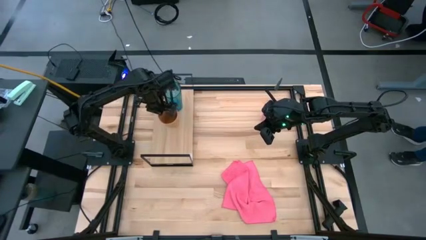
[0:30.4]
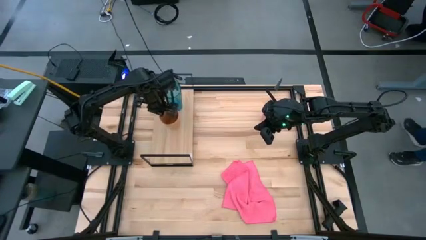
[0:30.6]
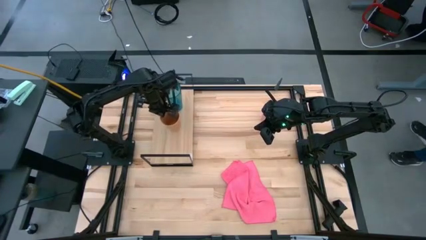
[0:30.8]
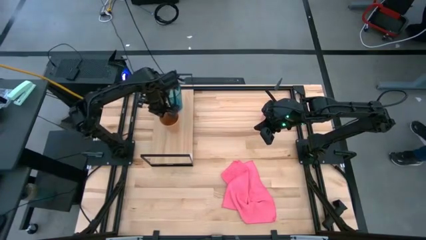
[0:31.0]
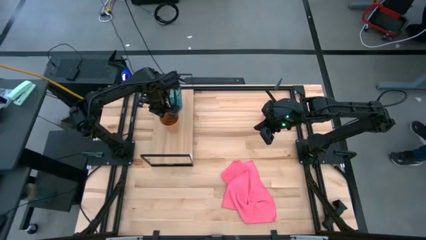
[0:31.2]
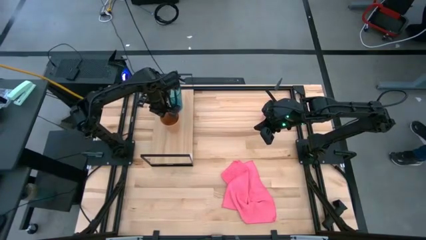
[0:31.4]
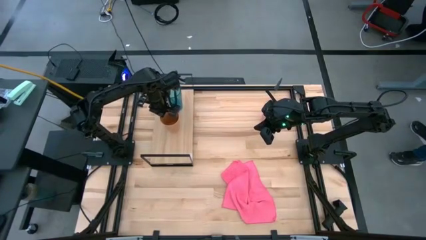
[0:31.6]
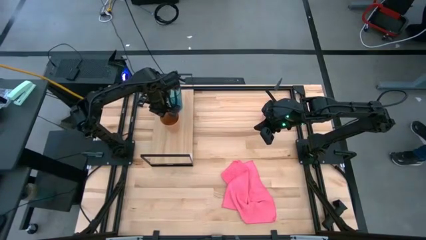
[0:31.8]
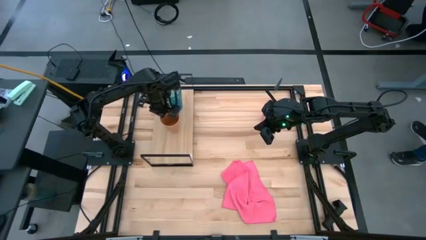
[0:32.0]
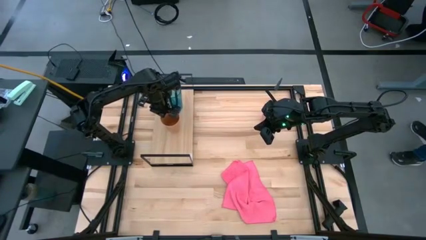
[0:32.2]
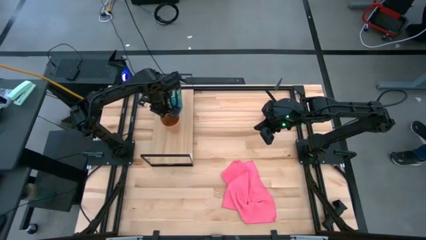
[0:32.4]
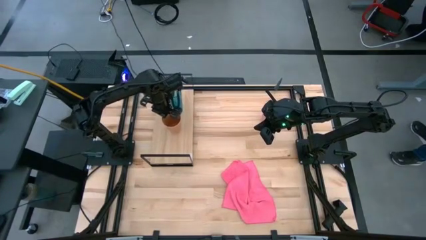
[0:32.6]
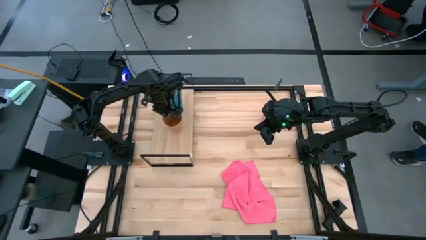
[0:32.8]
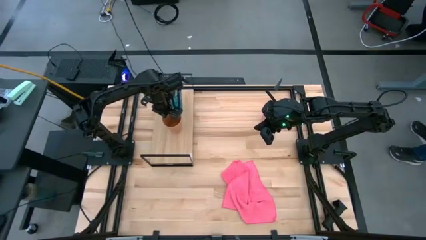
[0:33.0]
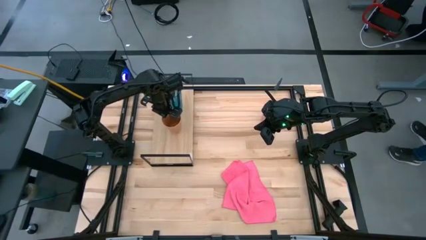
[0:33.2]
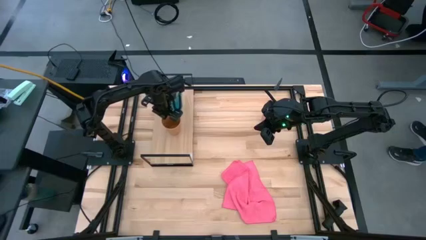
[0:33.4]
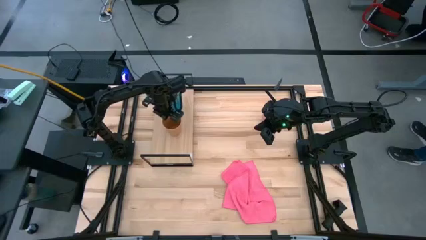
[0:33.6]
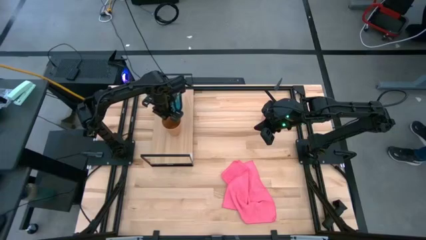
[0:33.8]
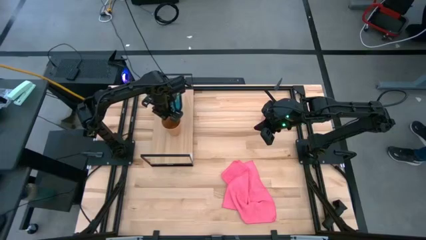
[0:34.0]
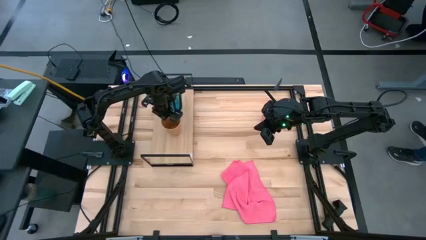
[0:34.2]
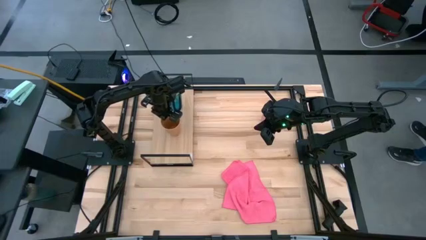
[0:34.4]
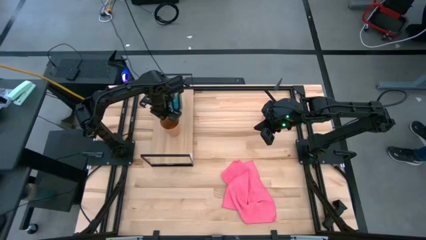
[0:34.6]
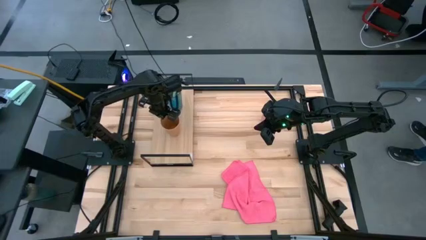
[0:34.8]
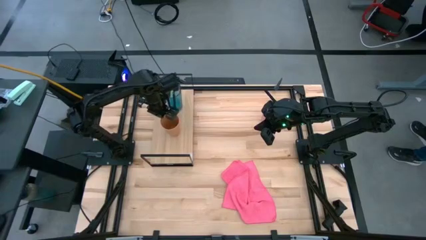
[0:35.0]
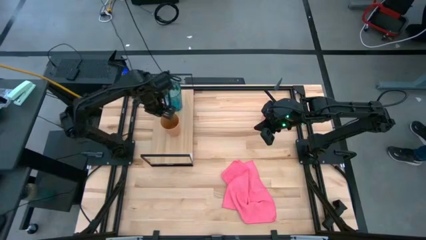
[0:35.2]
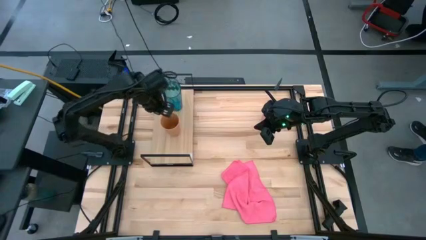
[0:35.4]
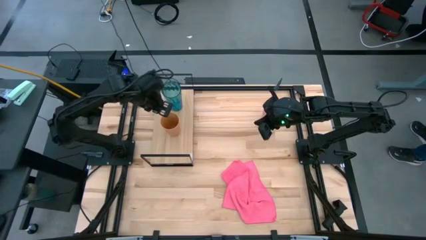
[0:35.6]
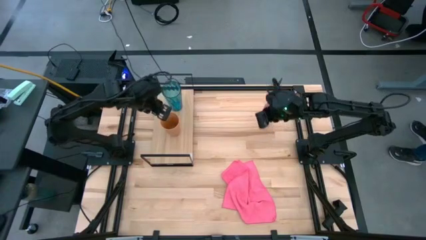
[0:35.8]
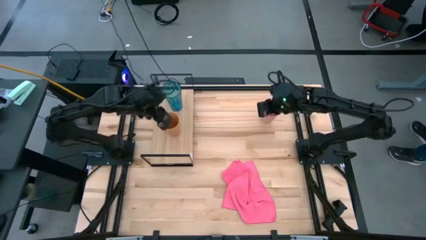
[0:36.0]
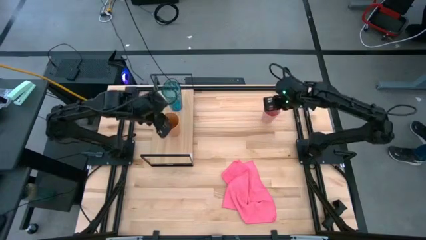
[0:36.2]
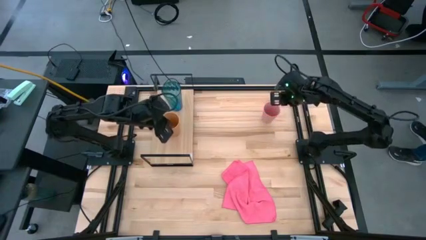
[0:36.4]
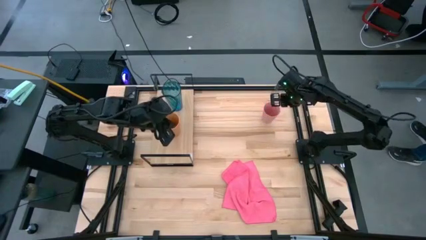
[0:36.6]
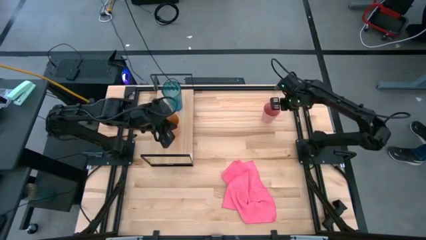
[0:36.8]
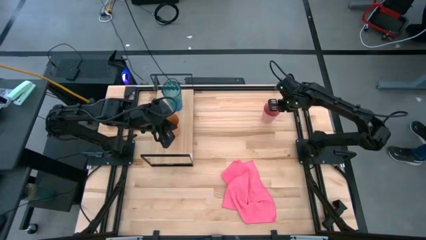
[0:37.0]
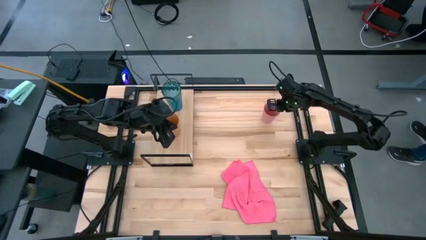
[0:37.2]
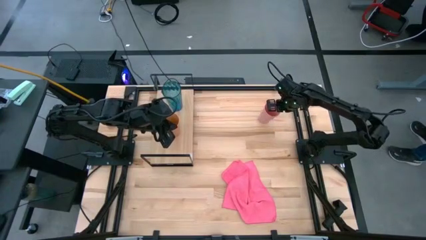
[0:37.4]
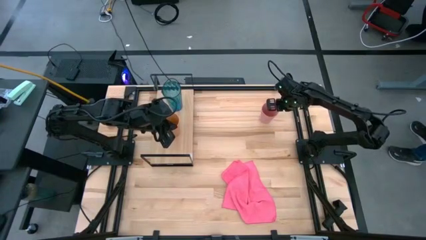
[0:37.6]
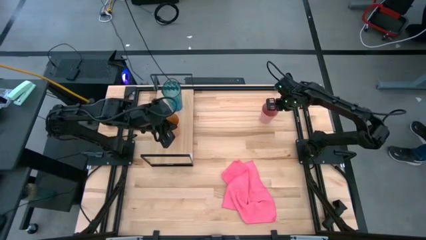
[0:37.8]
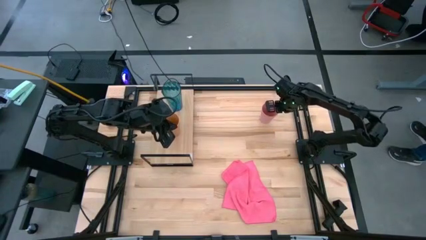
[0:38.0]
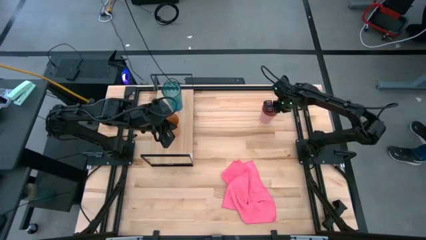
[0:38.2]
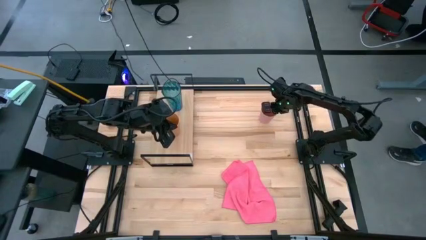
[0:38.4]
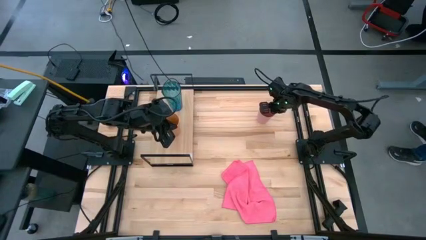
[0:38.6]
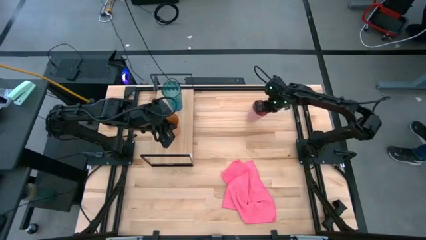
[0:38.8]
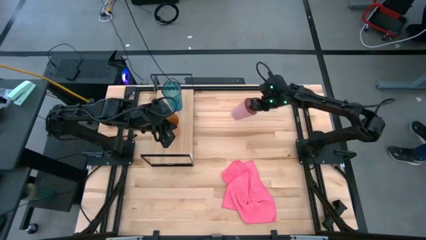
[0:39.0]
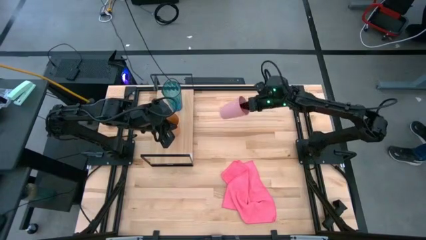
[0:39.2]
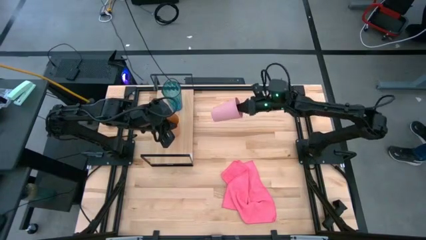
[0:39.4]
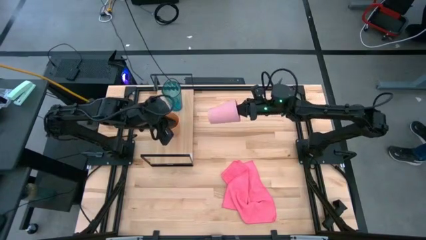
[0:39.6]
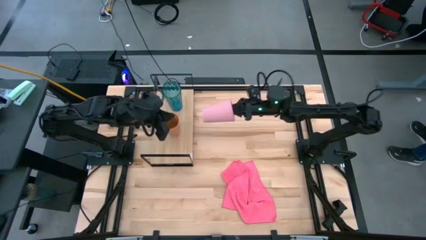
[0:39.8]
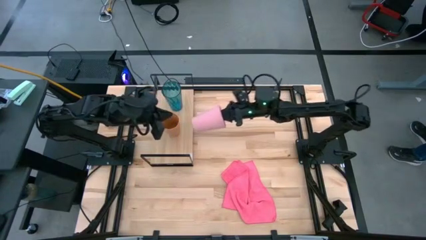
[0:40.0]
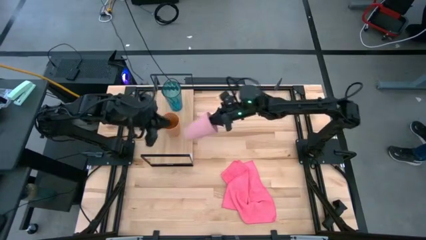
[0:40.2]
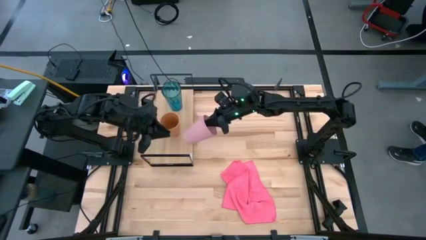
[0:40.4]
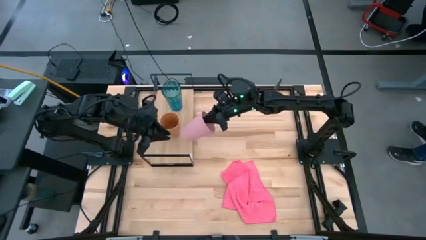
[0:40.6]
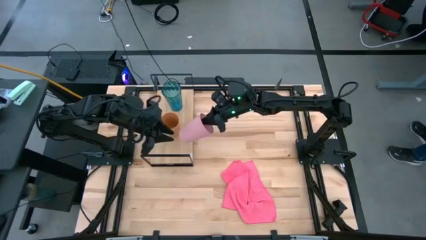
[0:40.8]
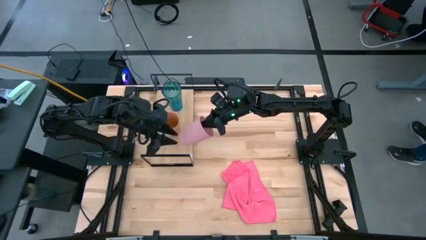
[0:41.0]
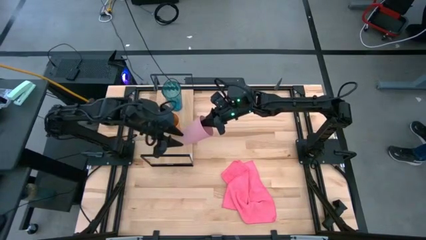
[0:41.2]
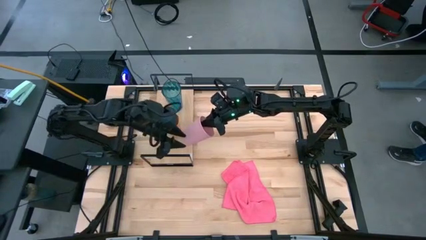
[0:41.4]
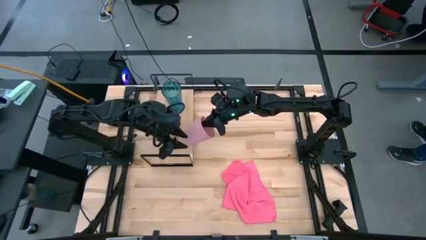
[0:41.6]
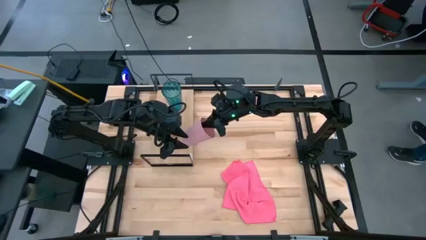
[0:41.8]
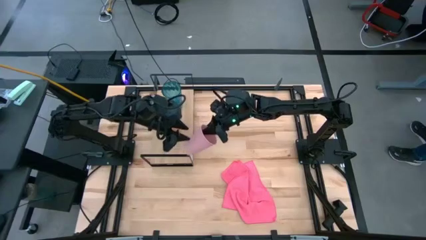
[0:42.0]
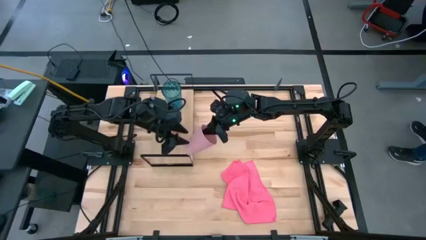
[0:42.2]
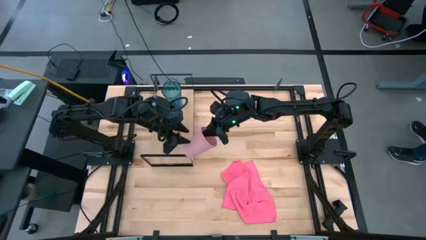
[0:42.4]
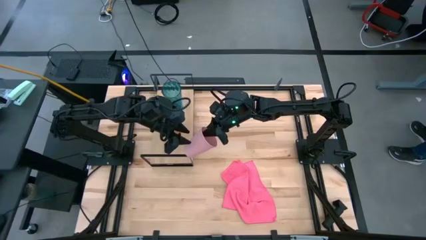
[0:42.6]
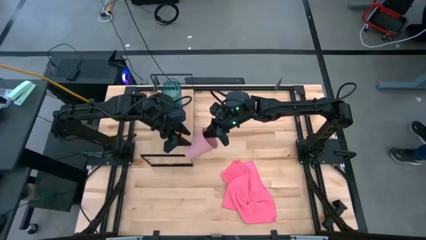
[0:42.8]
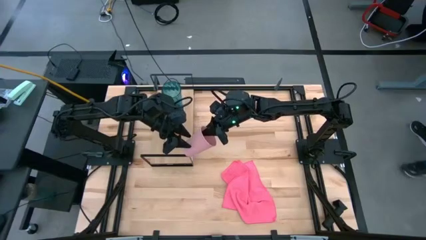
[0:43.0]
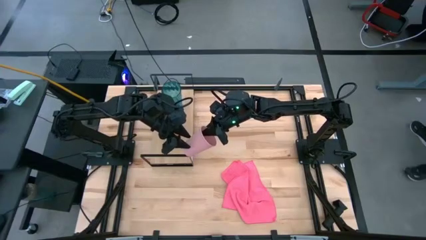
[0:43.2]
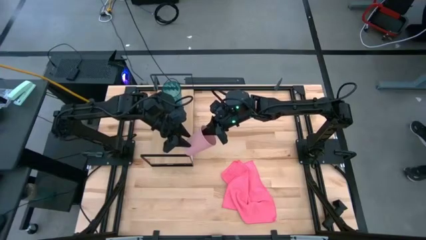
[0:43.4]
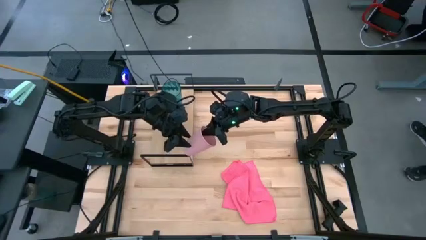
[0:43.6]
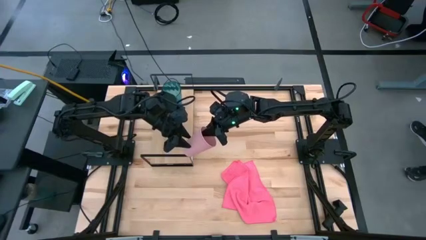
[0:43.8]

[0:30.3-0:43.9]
Task: Stack small to large cups/mugs on shelf
Put the orange cup on the shelf
